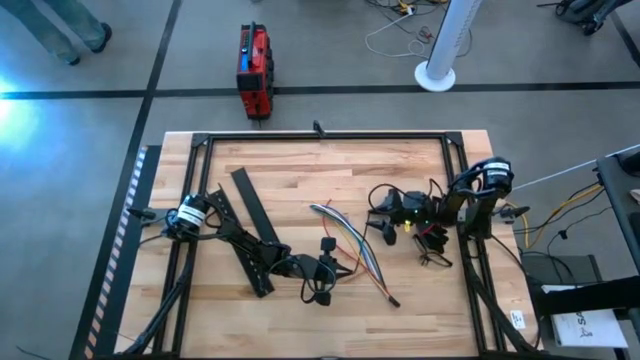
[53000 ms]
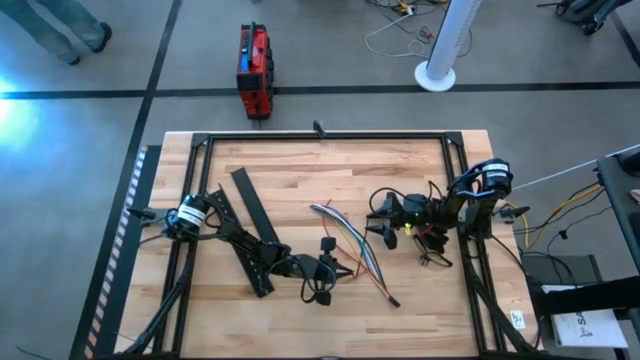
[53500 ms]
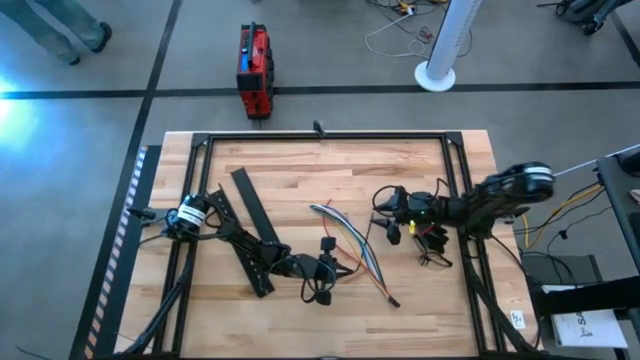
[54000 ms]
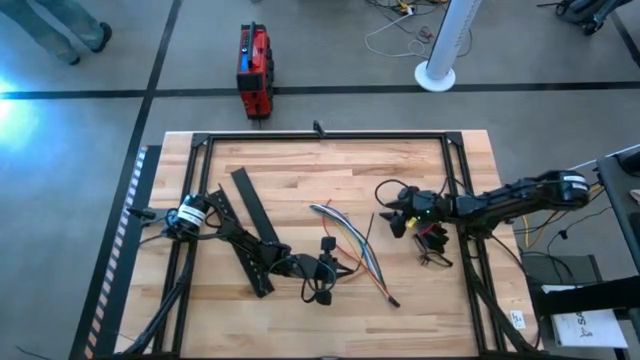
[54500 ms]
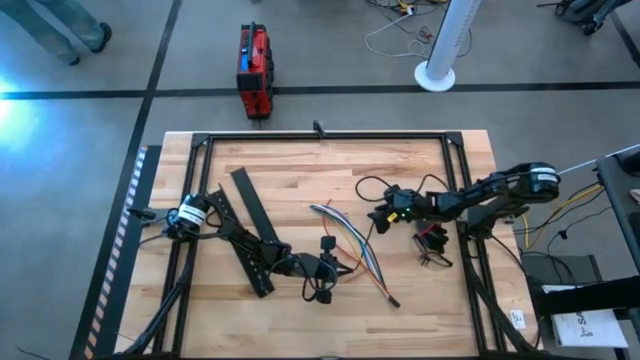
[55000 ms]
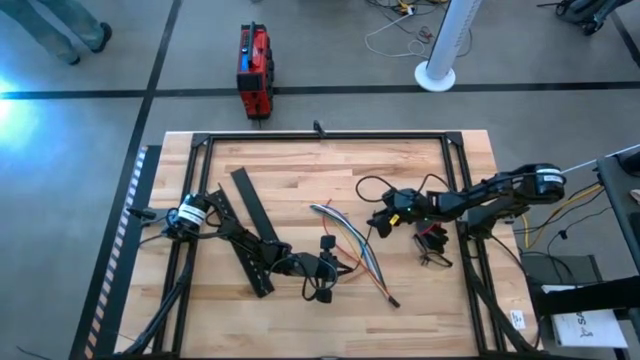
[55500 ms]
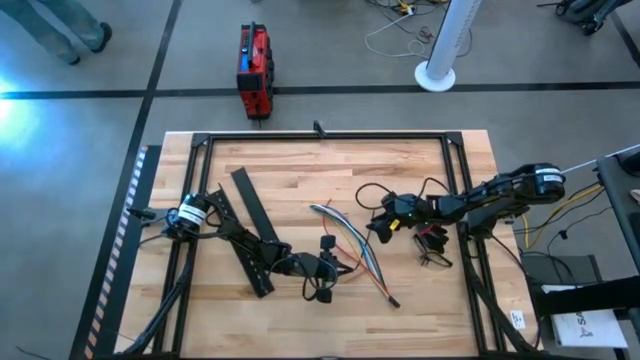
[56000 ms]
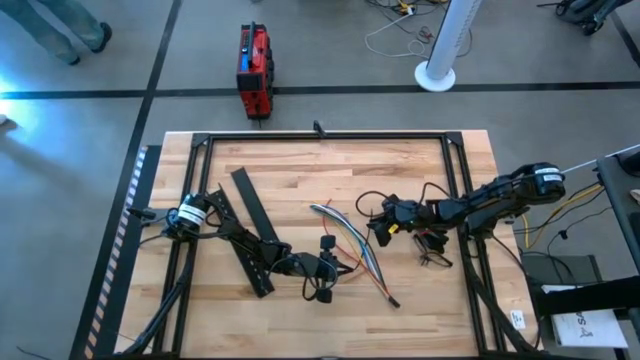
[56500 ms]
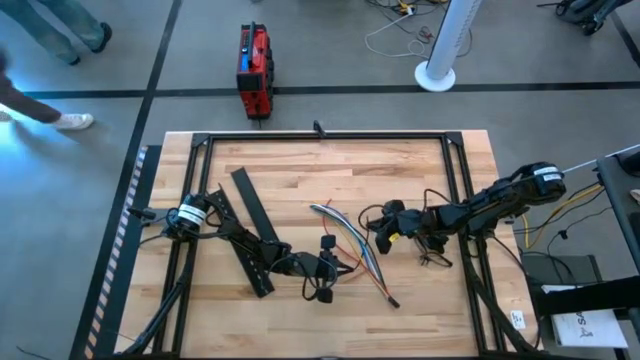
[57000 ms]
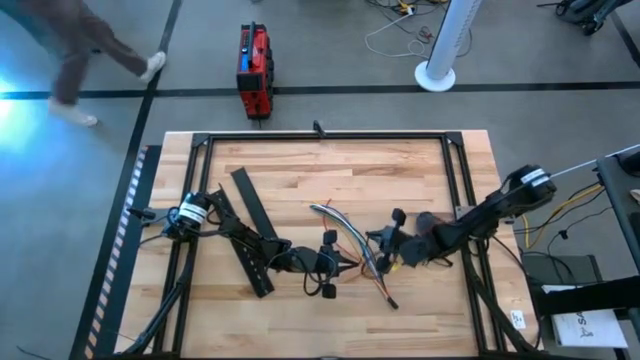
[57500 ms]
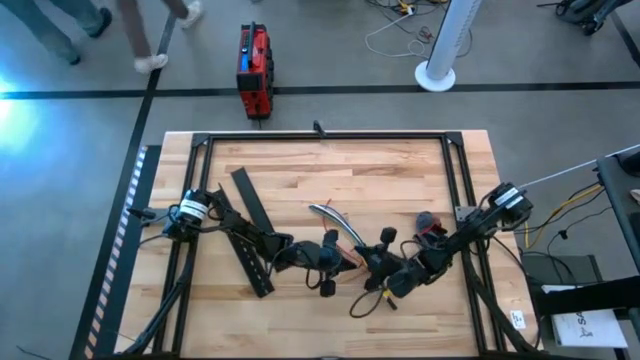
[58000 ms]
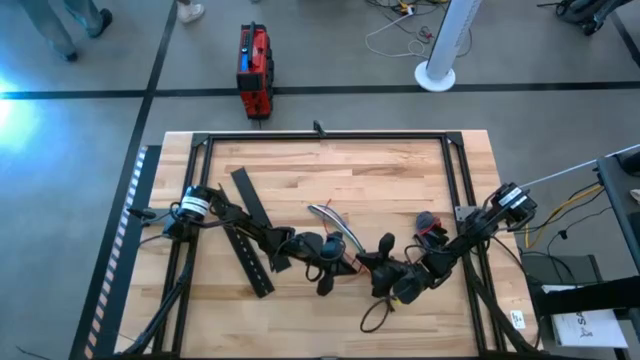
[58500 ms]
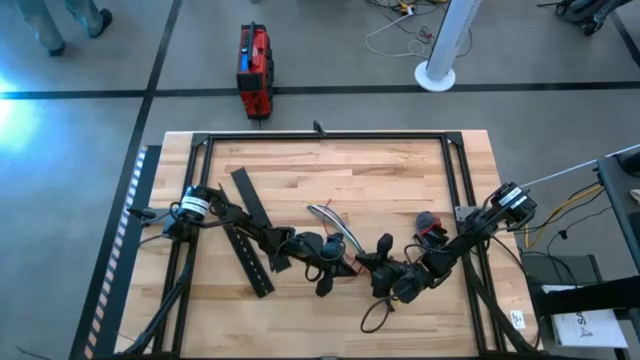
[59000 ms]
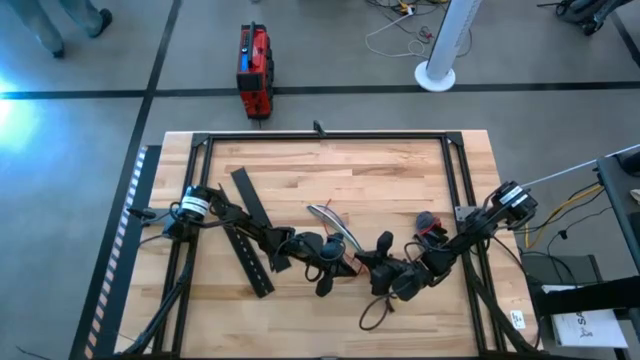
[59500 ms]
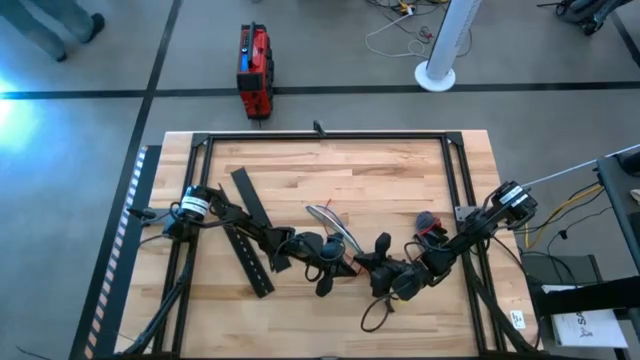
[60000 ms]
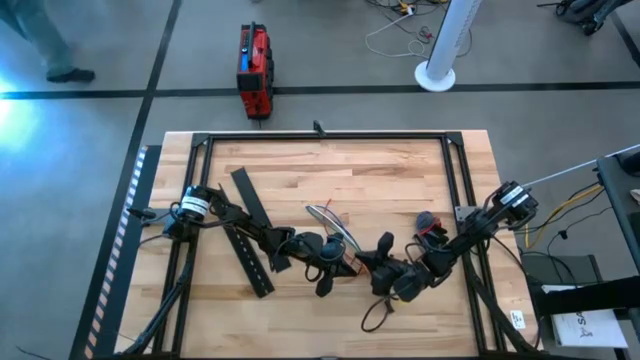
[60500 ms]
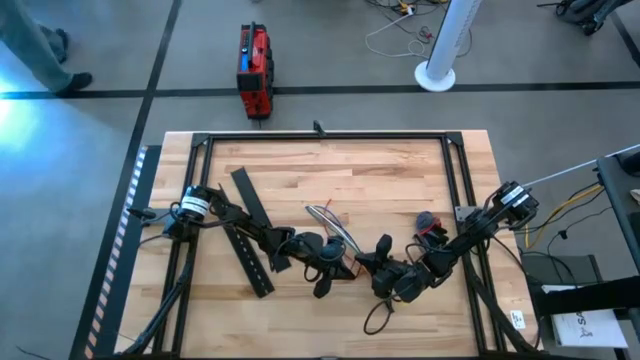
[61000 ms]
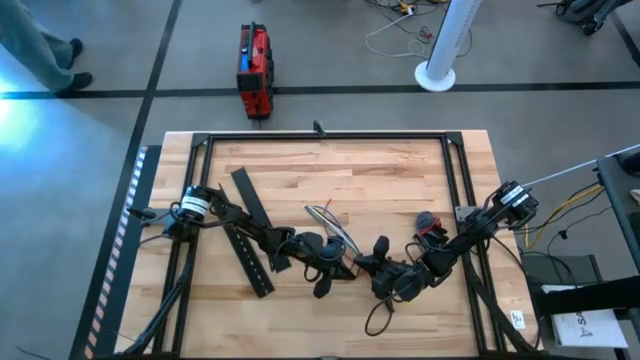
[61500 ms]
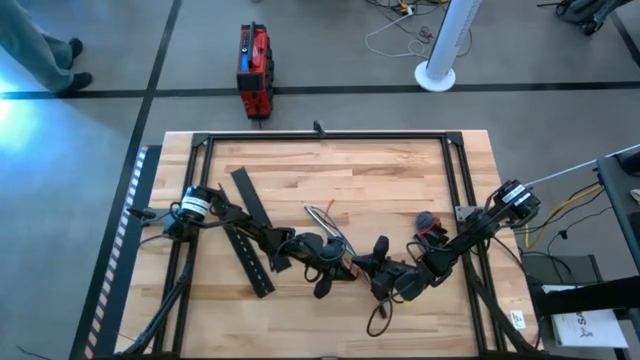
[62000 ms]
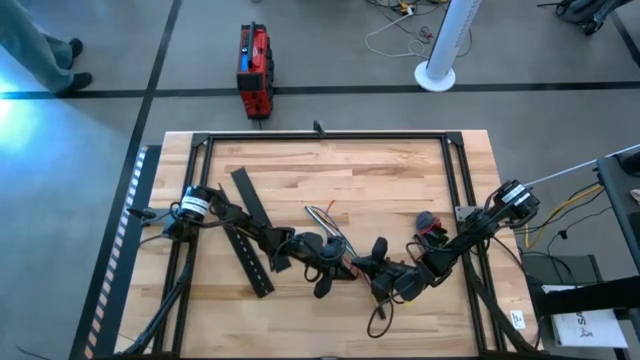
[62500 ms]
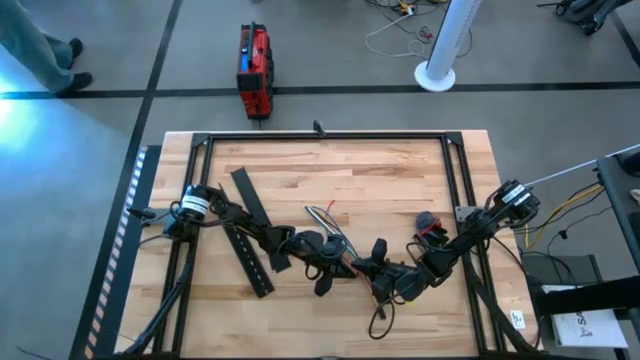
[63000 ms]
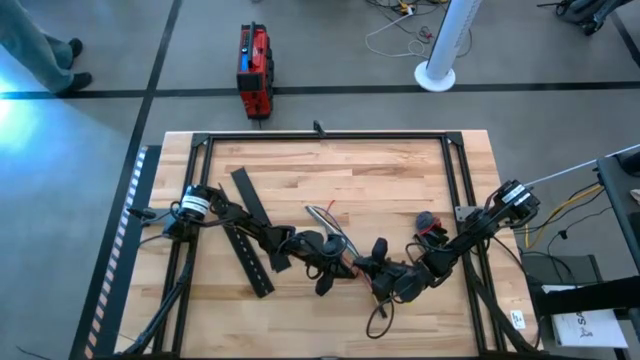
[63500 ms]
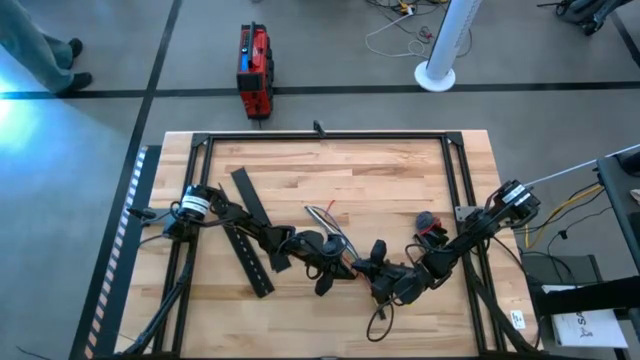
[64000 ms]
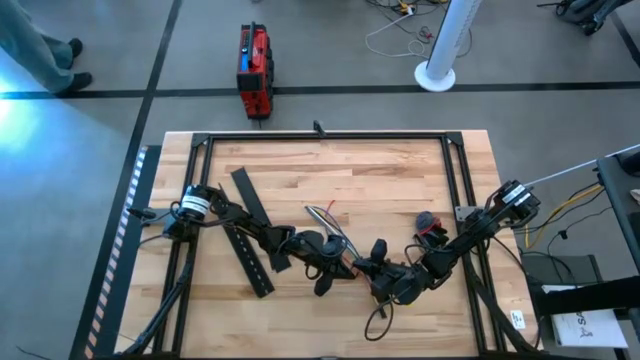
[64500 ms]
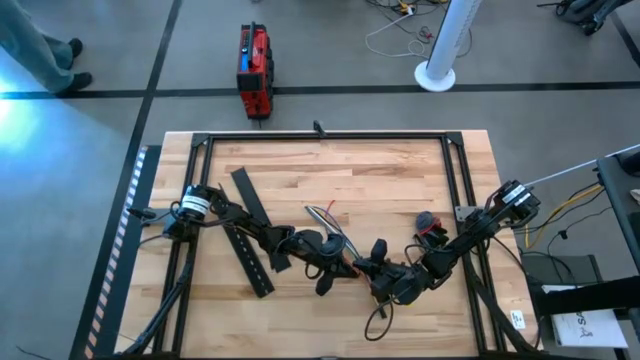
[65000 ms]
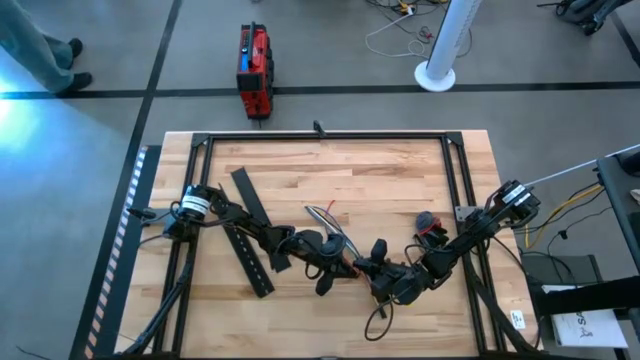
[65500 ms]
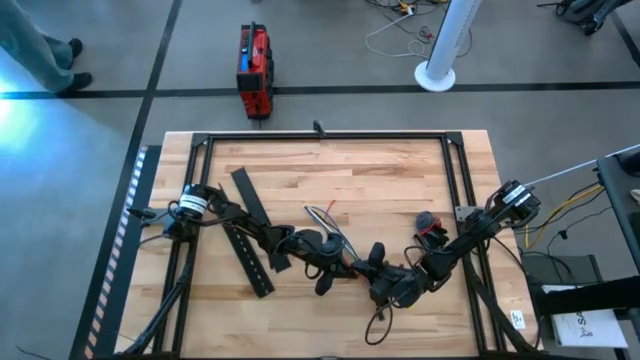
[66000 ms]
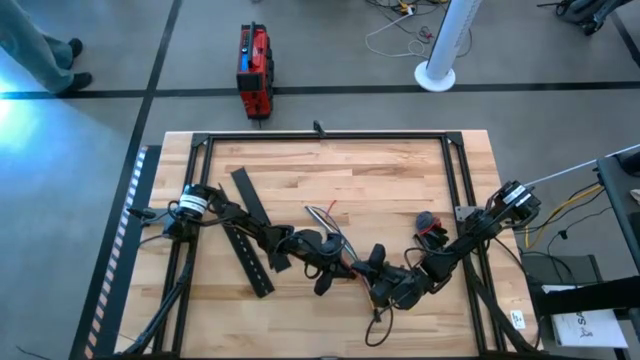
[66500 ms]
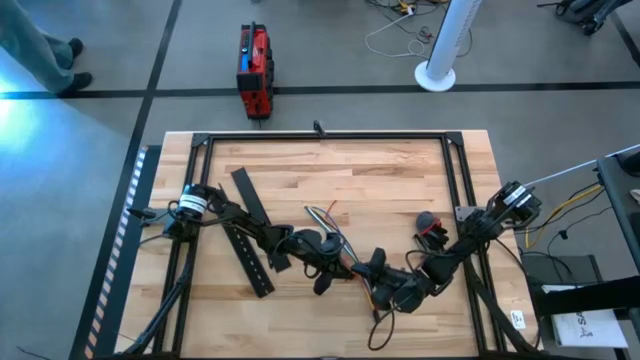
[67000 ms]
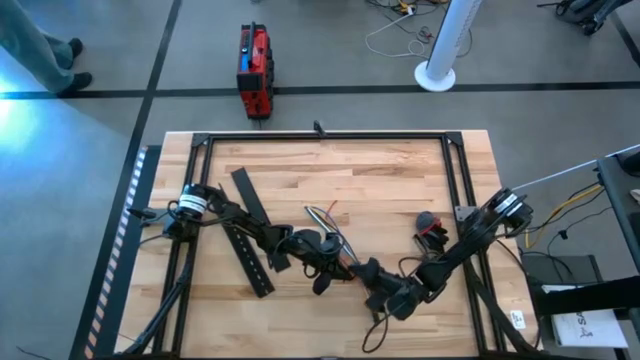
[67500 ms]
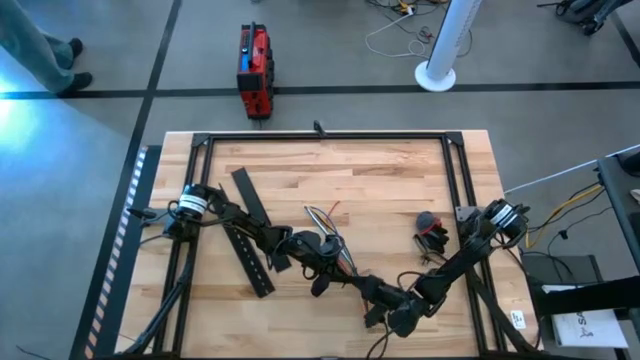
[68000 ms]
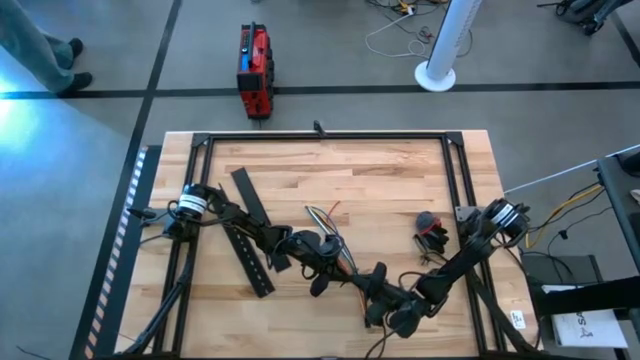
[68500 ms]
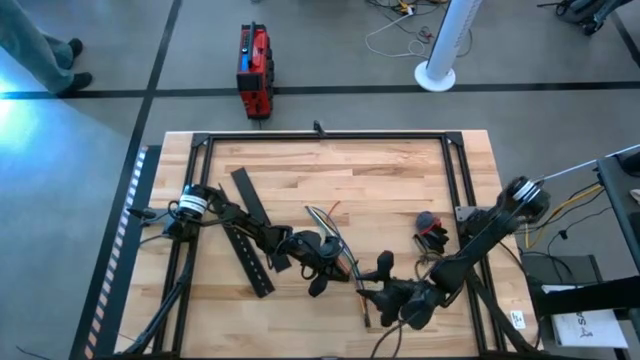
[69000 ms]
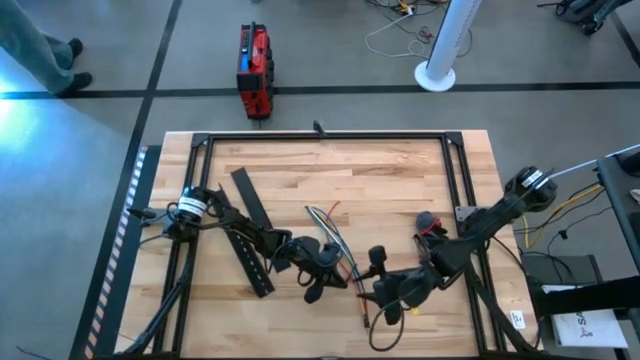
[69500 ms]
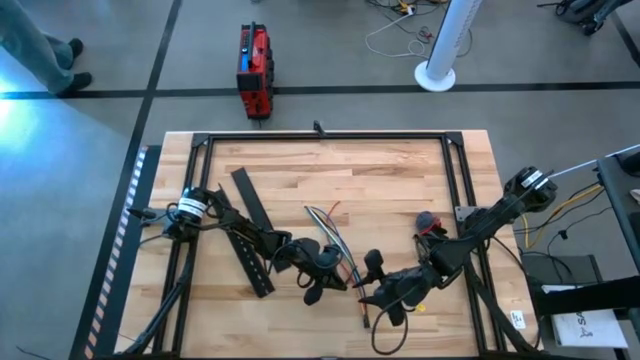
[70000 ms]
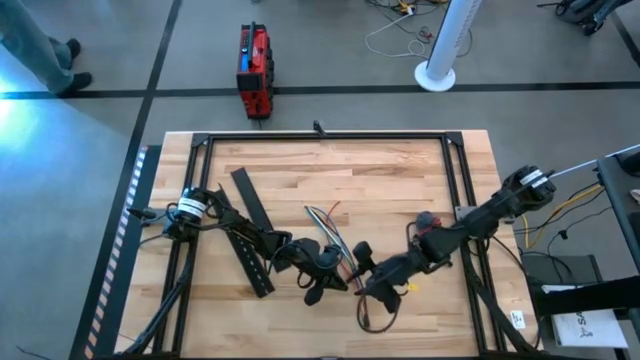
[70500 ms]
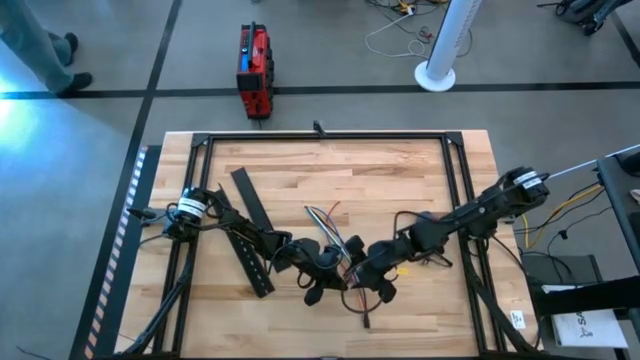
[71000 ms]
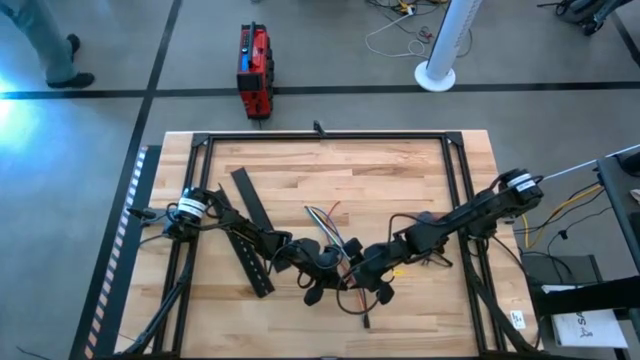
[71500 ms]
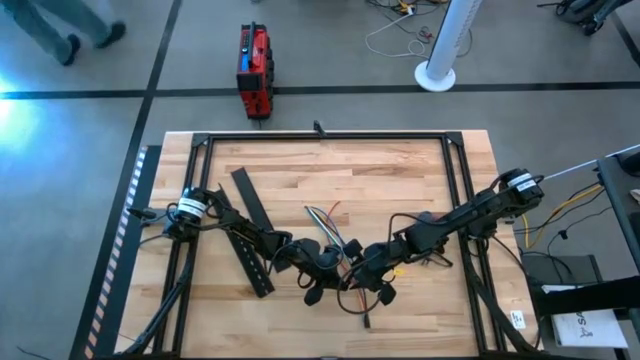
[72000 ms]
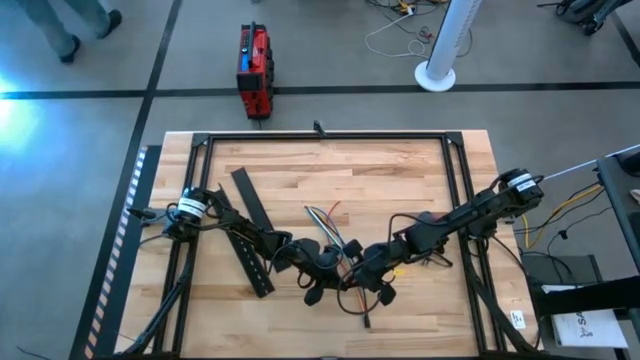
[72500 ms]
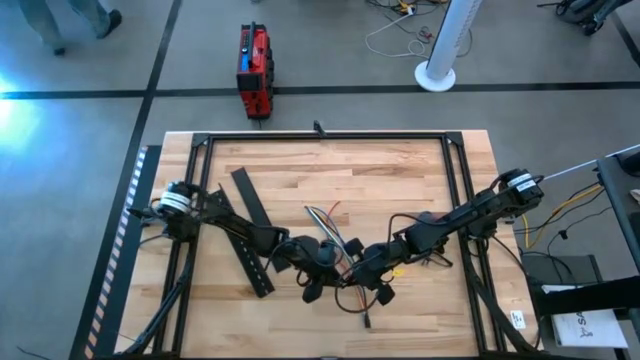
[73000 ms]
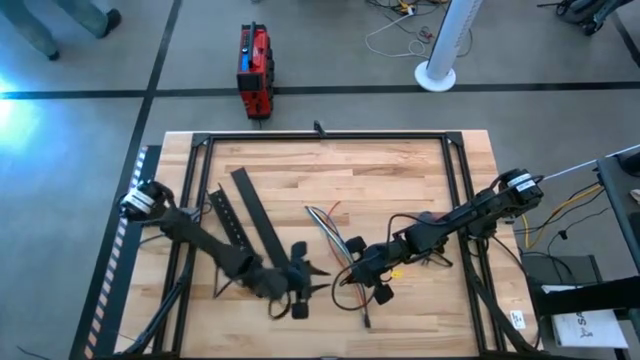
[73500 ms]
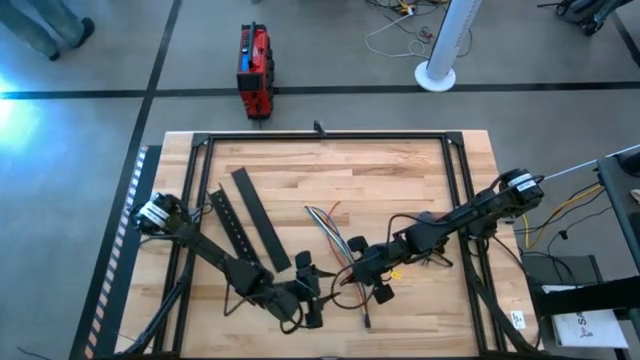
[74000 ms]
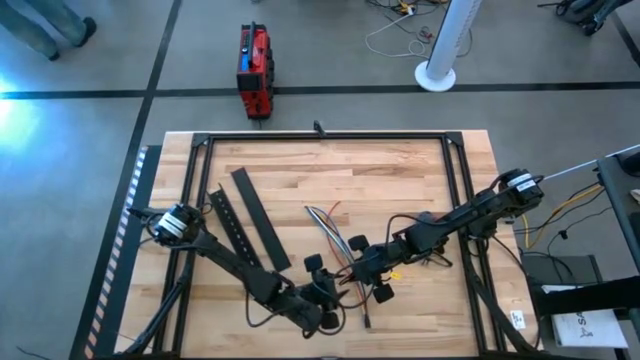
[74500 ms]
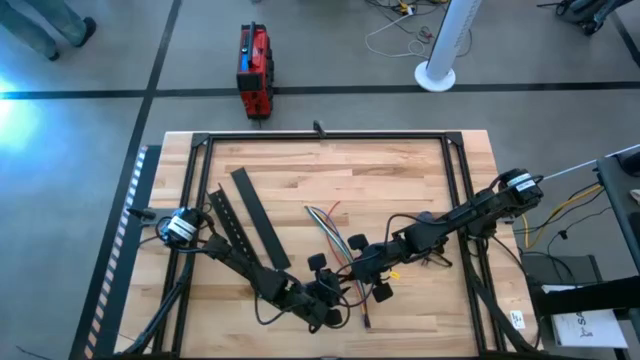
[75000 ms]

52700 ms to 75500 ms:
Task: Ziptie cables
Wrap the cable wires with the black zip tie
